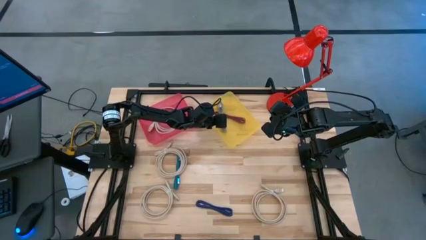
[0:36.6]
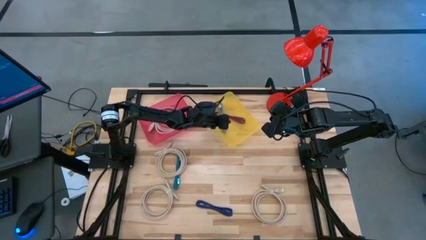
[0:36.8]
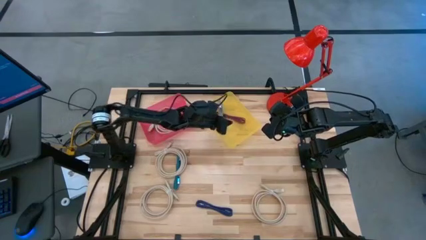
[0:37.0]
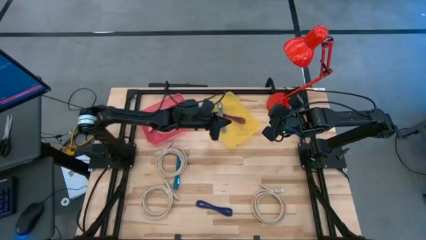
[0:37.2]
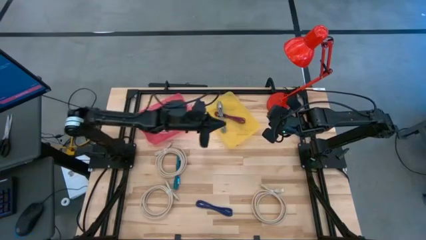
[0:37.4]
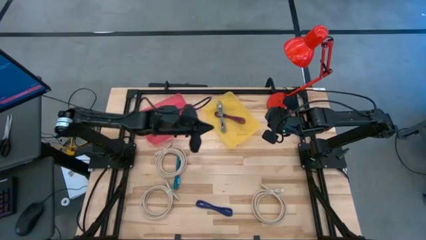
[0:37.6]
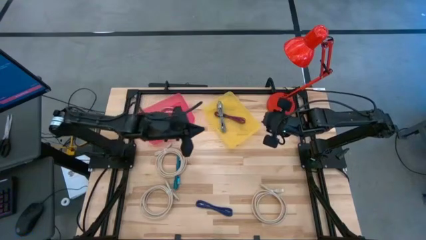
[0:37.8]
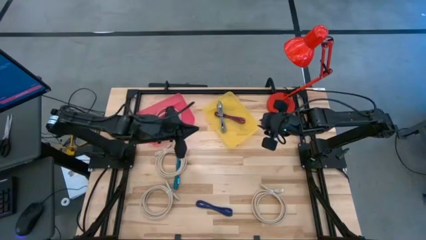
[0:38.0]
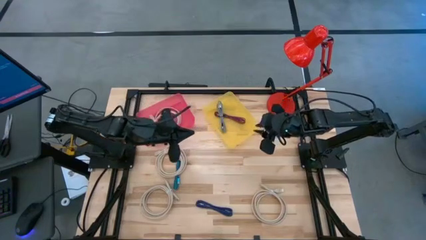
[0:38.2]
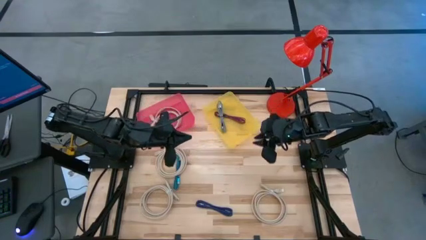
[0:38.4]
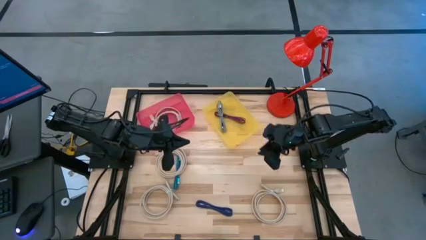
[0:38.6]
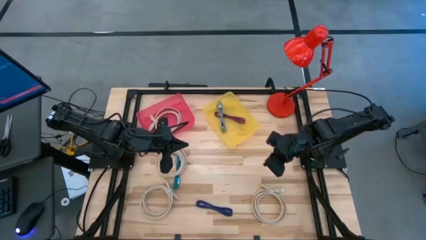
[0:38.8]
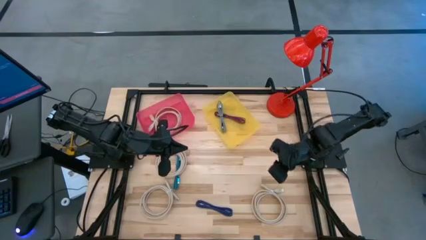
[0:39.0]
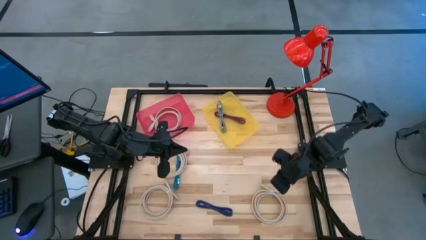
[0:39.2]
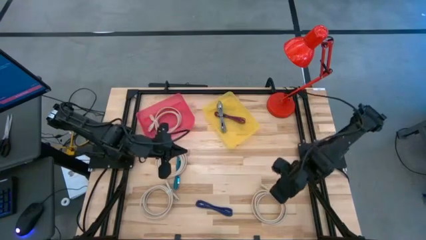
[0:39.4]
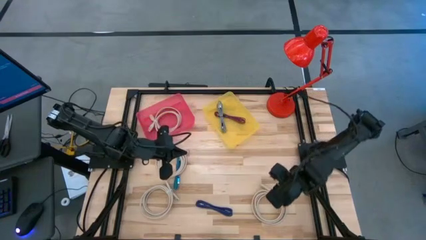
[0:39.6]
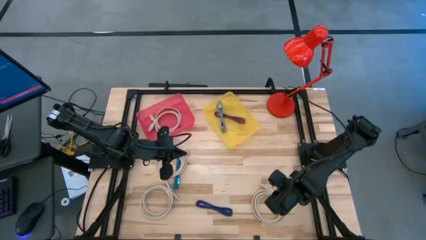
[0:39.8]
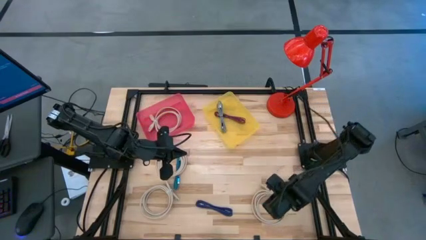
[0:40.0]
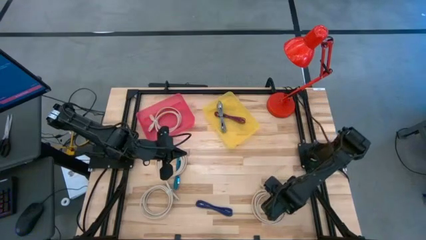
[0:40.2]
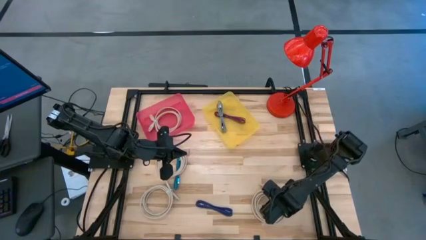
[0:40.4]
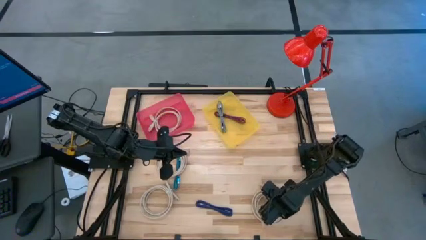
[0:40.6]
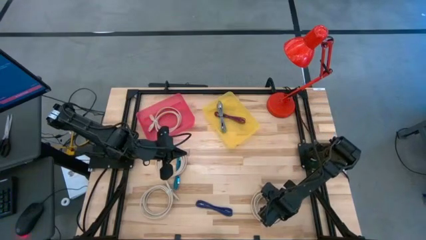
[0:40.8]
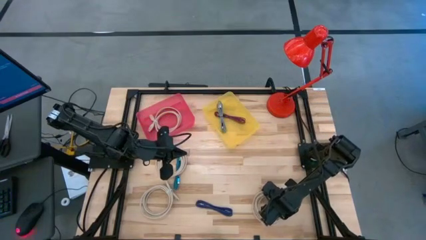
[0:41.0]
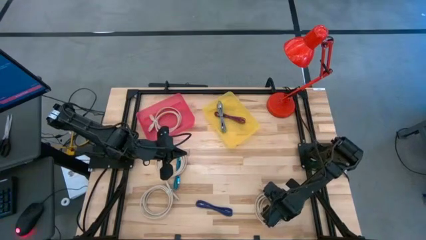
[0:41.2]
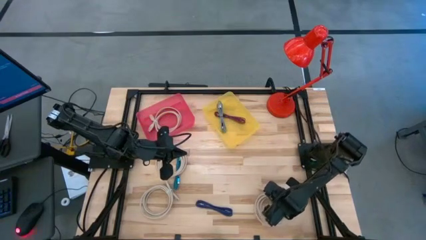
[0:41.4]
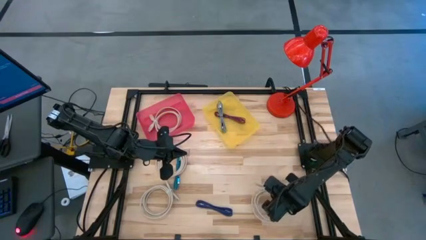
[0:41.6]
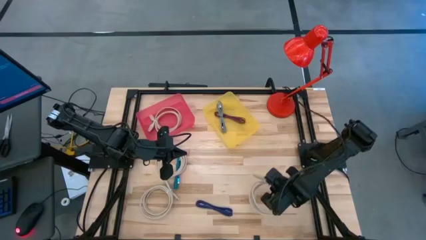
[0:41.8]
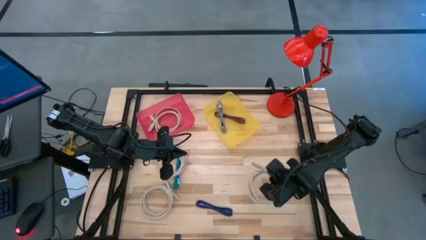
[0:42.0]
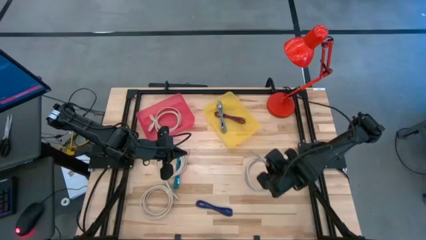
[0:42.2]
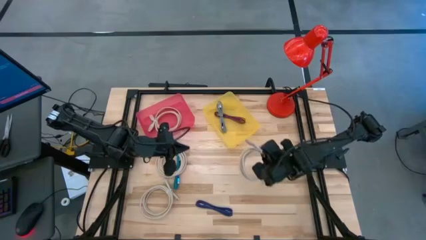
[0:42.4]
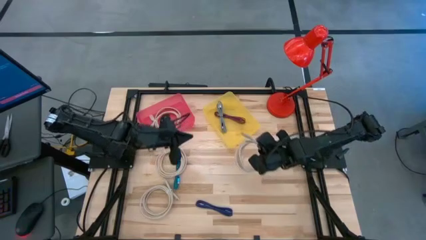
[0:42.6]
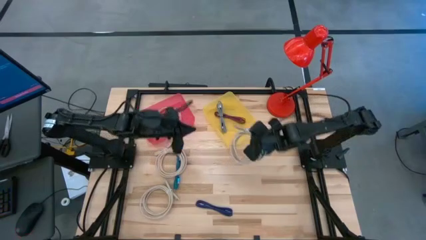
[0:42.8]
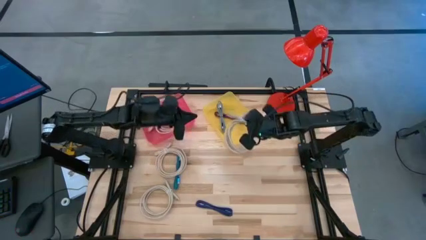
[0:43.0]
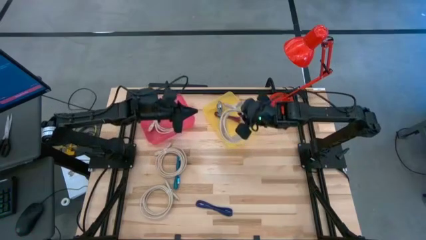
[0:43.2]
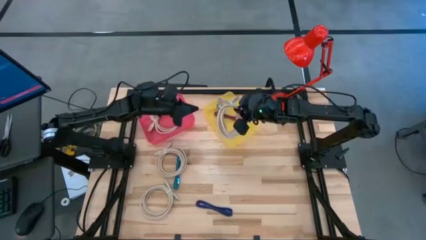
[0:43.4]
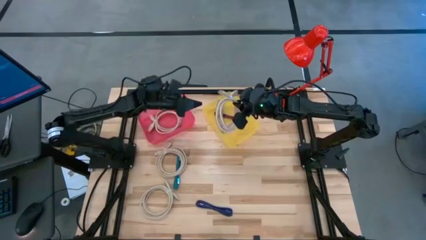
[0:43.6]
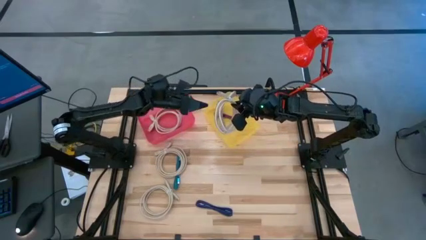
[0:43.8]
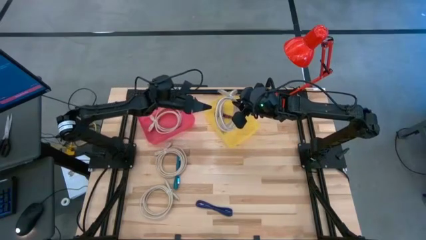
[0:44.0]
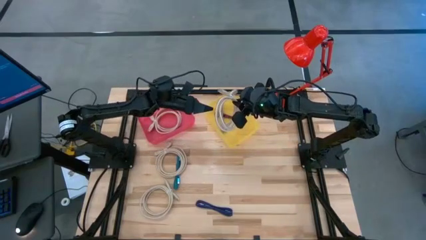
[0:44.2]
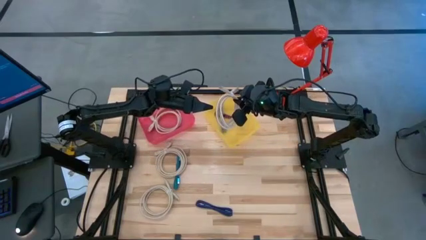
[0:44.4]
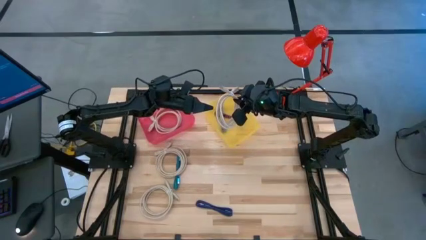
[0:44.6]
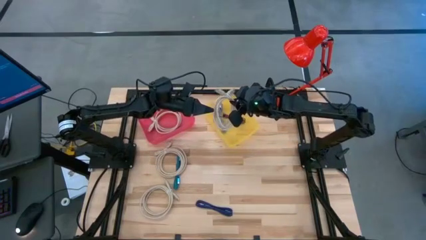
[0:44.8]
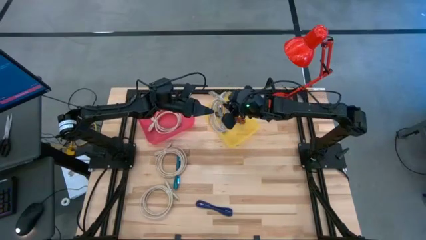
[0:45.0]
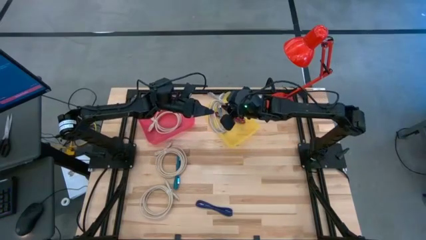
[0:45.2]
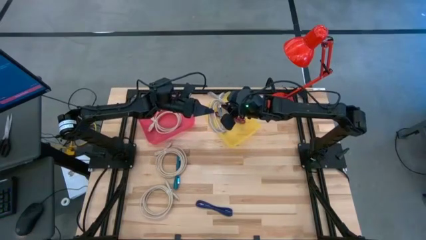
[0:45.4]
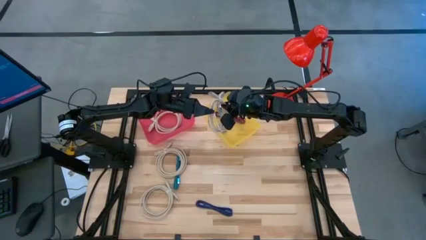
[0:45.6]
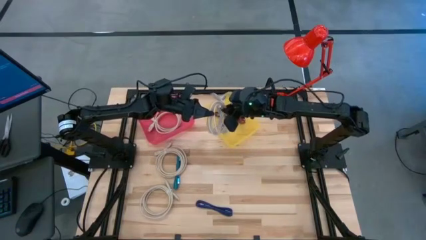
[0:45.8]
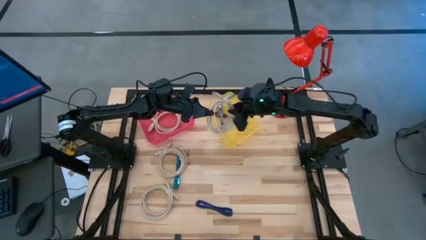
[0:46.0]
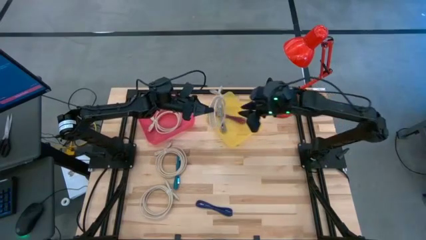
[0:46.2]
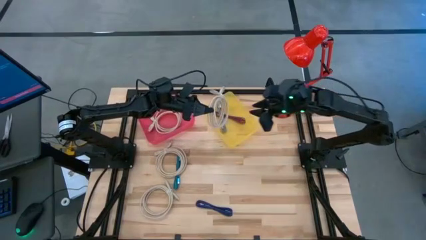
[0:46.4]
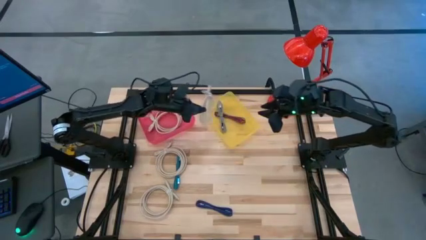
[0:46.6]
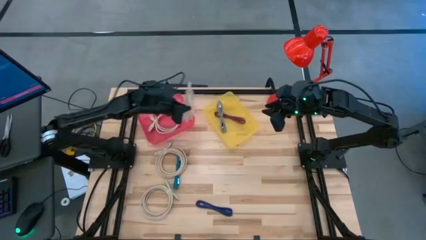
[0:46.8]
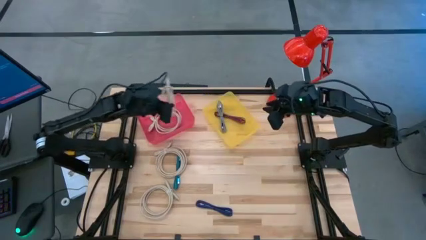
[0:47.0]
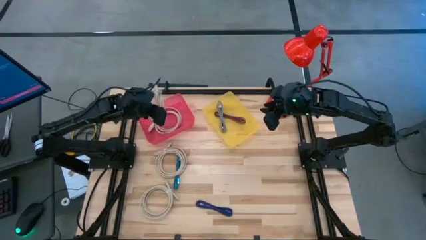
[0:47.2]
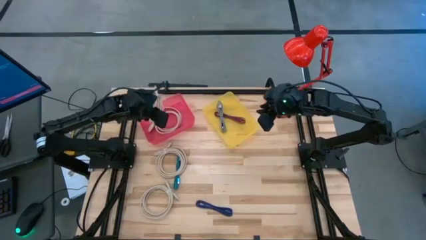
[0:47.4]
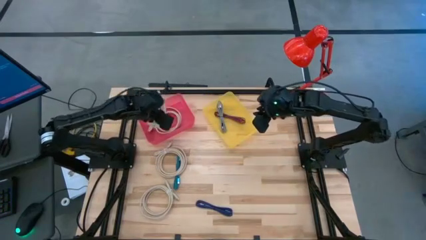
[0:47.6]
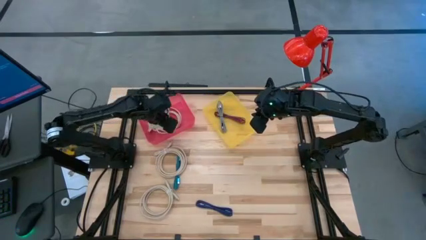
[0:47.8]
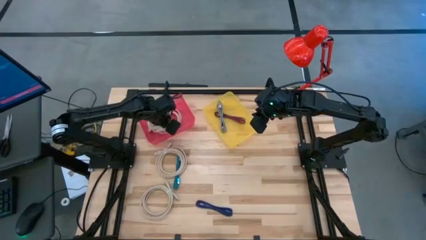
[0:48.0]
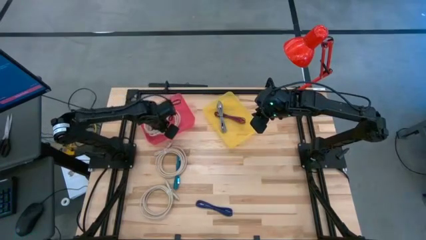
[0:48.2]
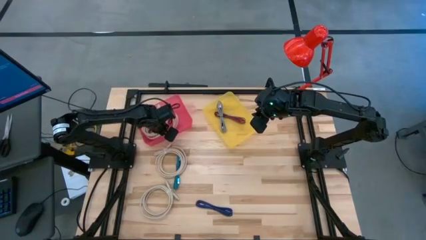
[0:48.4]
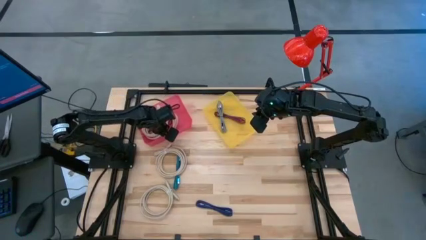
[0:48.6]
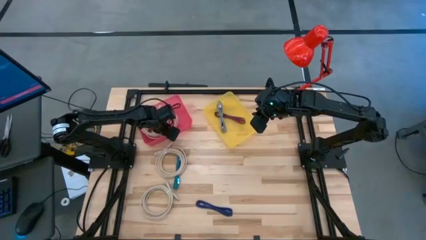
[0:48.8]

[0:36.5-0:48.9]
Task: Pick & Place USB Port
Put the white HDMI cable into the pink transparent bin

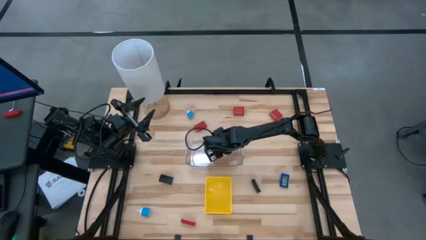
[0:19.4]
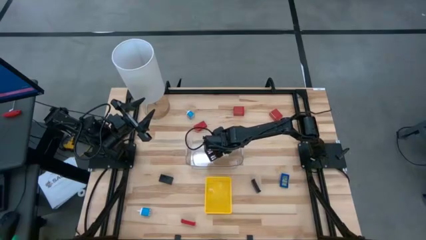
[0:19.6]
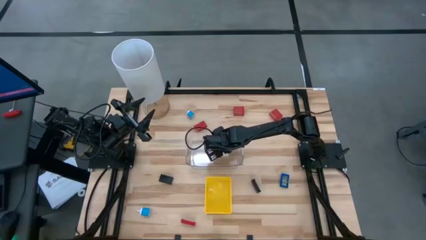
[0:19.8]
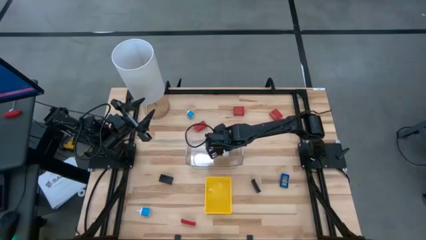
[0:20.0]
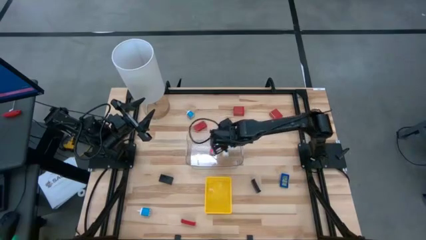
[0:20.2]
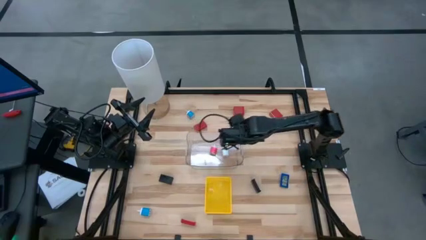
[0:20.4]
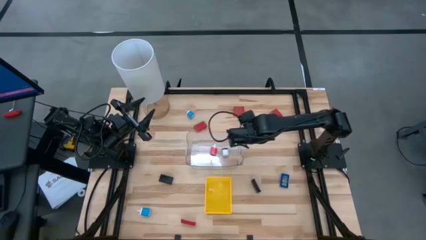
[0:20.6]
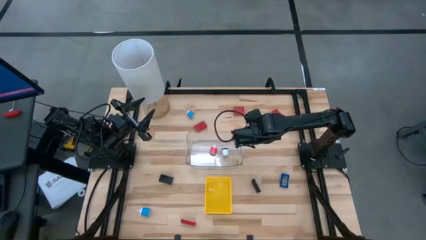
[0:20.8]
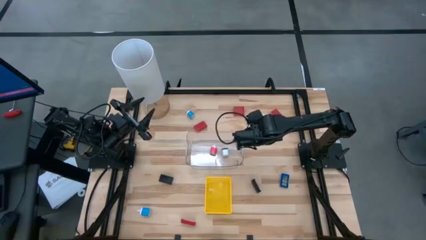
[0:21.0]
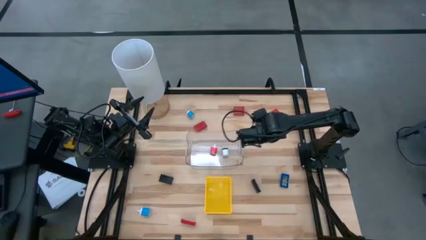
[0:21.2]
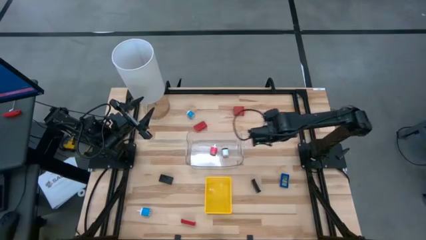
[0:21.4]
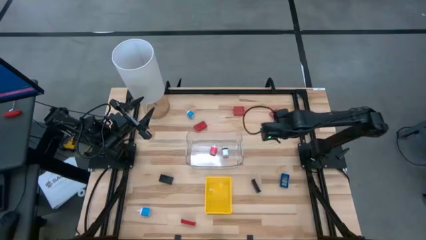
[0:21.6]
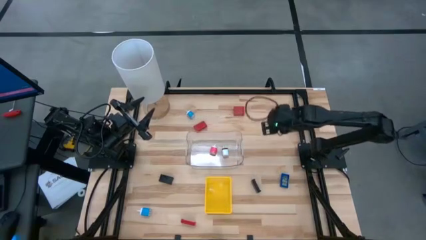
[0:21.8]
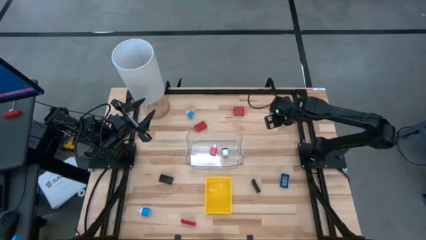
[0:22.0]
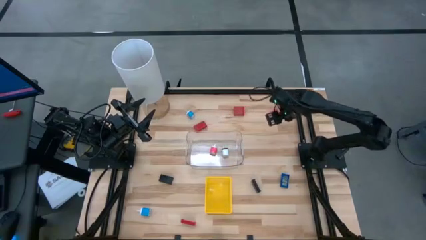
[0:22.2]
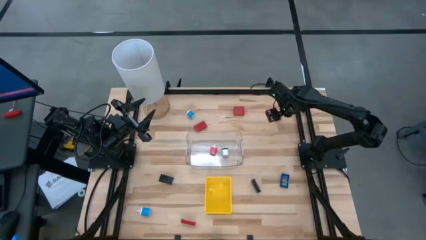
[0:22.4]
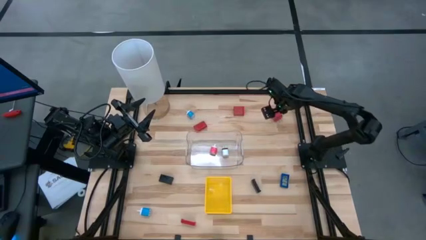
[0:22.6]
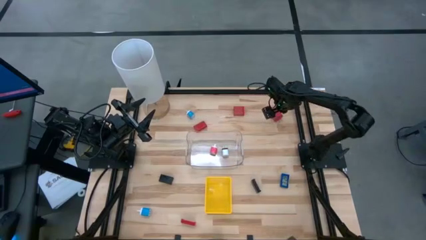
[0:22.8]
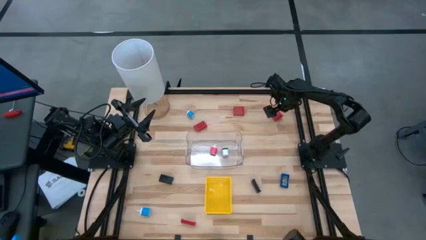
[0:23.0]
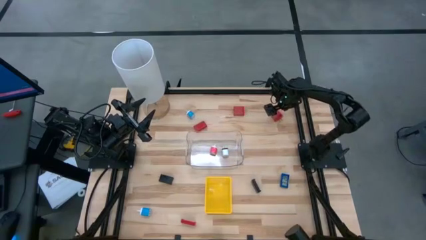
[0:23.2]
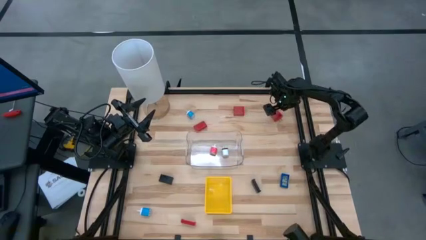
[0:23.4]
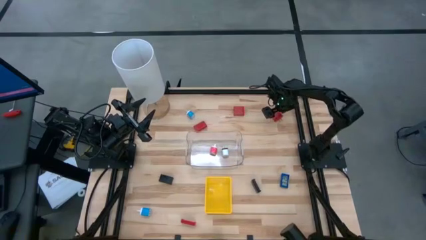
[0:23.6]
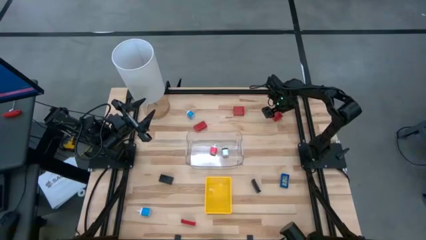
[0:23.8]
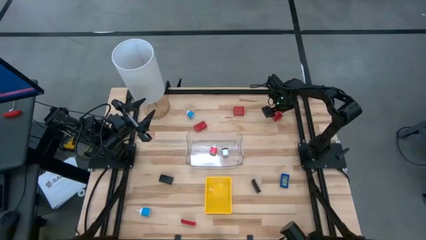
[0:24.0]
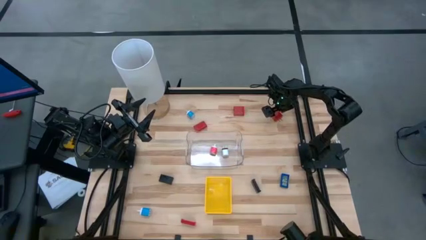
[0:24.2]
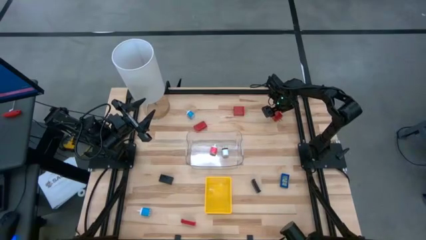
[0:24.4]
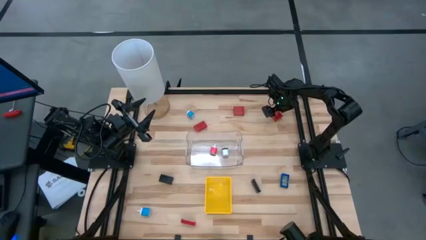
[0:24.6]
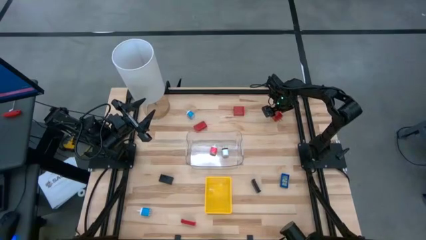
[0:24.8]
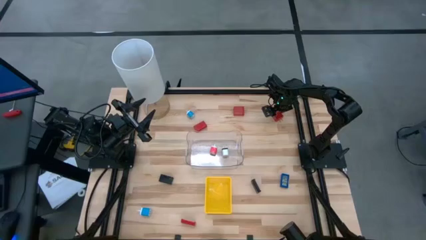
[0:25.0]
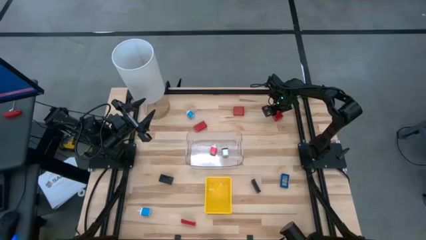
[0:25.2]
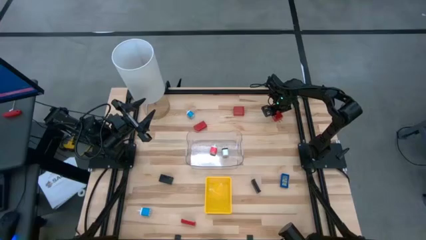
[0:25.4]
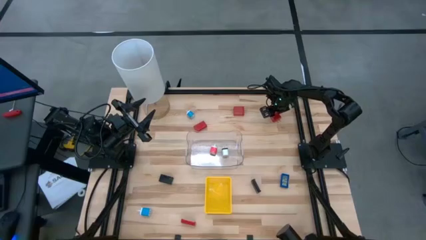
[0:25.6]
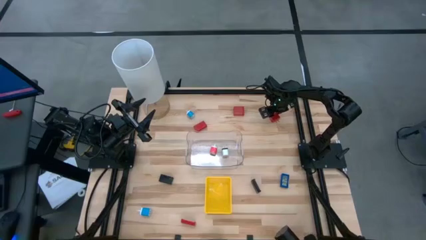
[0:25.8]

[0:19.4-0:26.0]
Task: Pick & Place Office items
Put the right red charger adapter into the transparent bin
